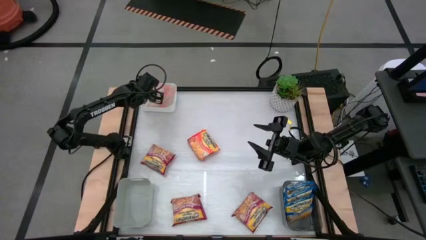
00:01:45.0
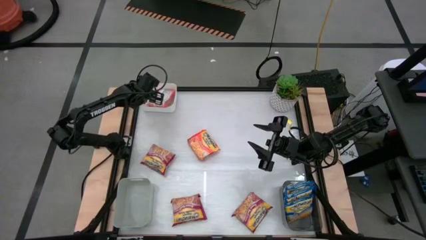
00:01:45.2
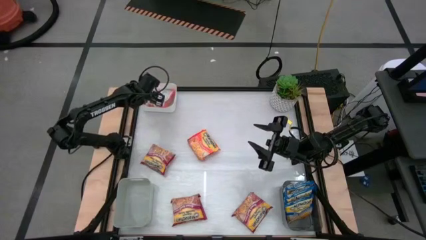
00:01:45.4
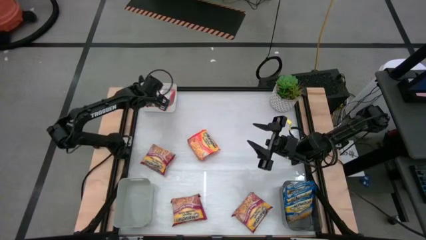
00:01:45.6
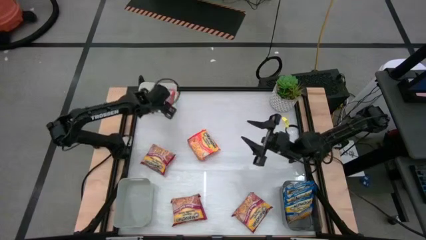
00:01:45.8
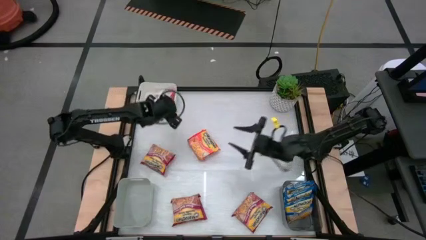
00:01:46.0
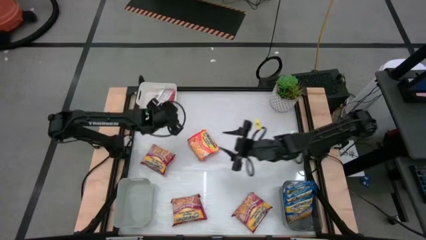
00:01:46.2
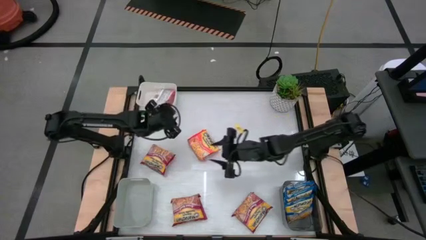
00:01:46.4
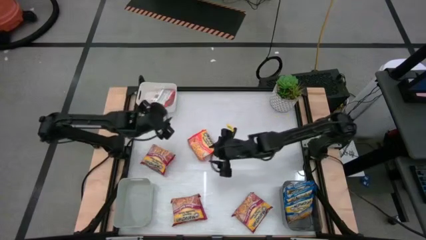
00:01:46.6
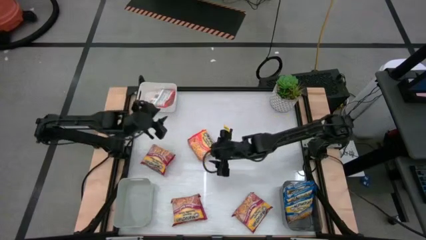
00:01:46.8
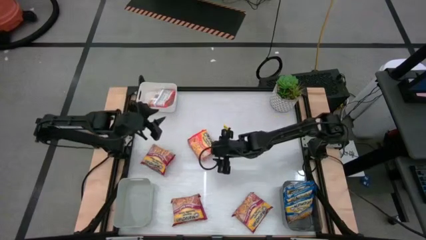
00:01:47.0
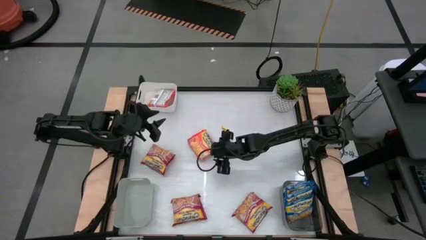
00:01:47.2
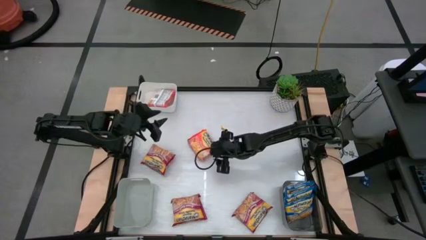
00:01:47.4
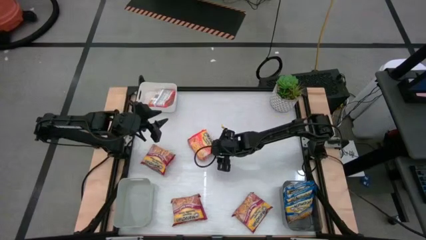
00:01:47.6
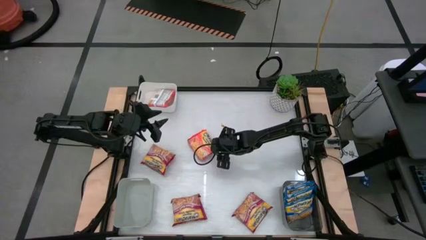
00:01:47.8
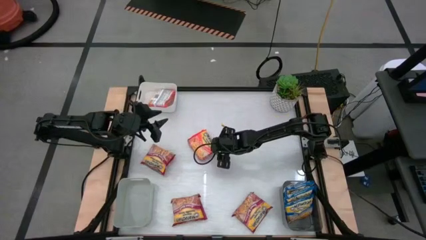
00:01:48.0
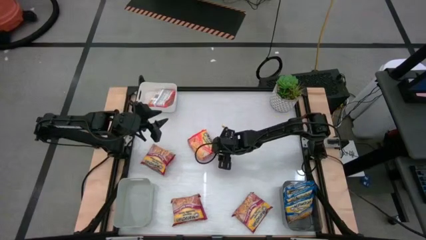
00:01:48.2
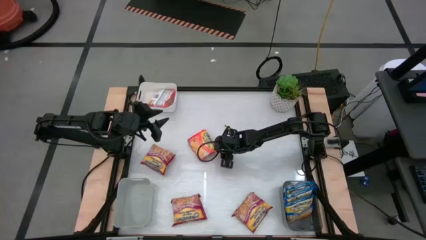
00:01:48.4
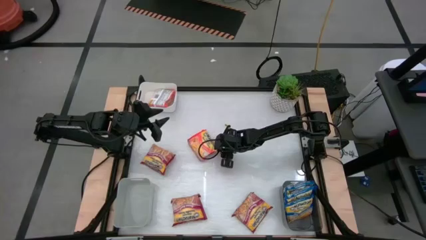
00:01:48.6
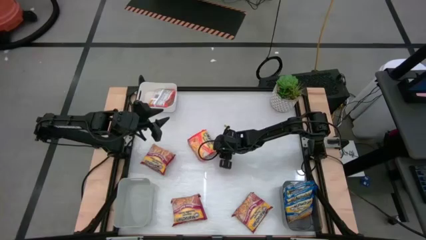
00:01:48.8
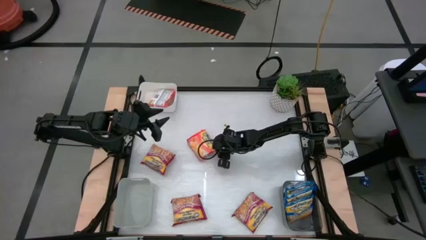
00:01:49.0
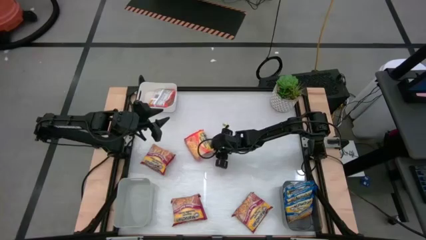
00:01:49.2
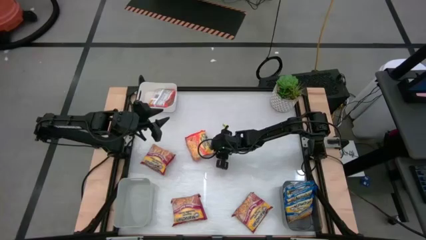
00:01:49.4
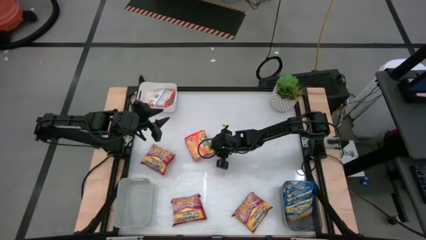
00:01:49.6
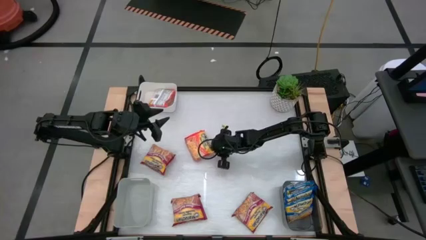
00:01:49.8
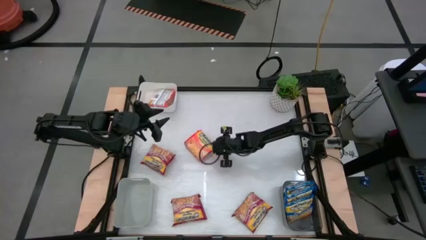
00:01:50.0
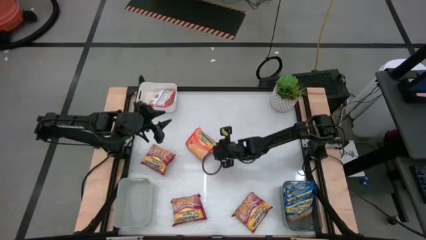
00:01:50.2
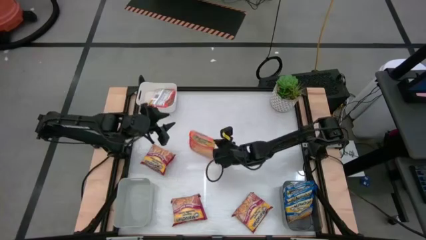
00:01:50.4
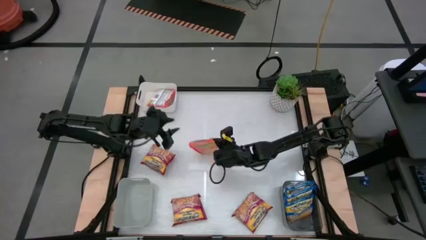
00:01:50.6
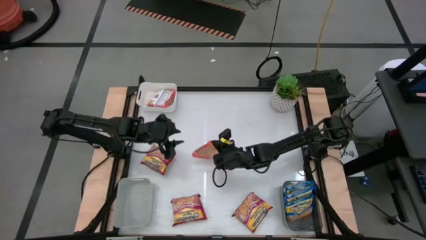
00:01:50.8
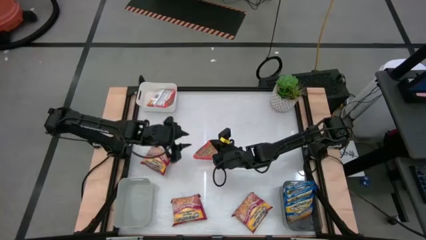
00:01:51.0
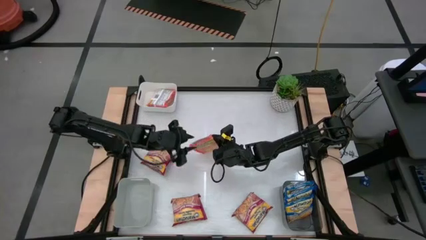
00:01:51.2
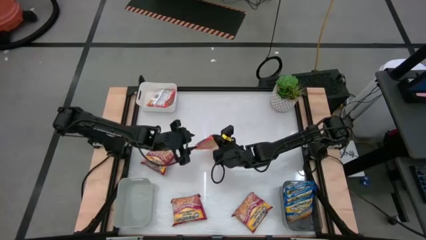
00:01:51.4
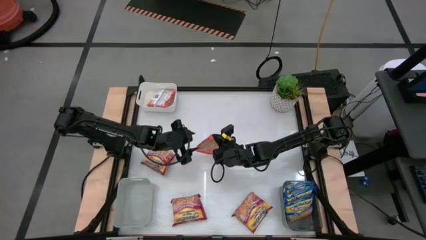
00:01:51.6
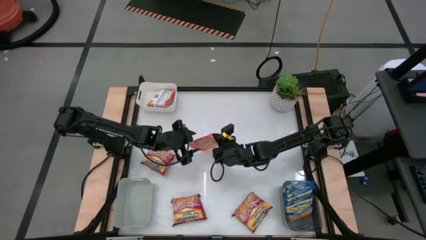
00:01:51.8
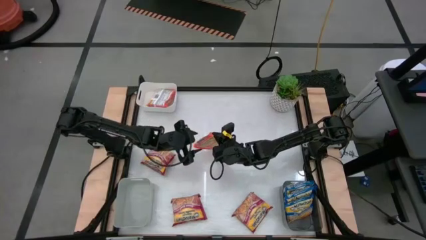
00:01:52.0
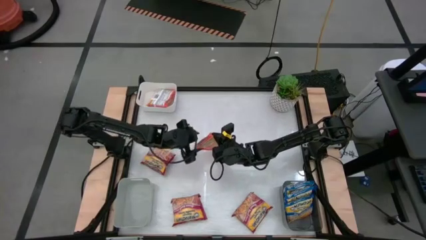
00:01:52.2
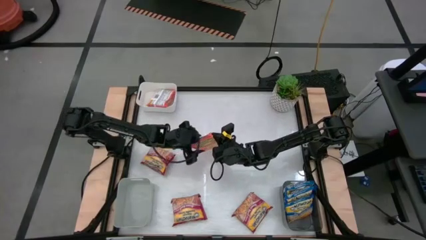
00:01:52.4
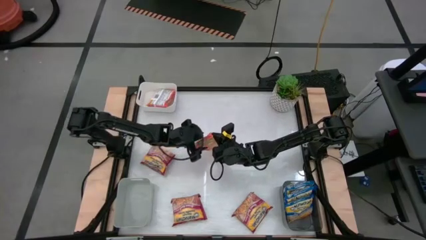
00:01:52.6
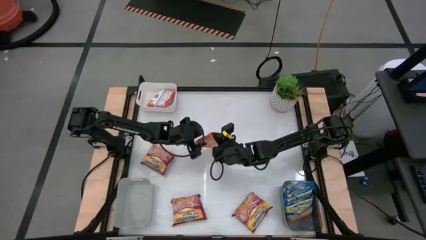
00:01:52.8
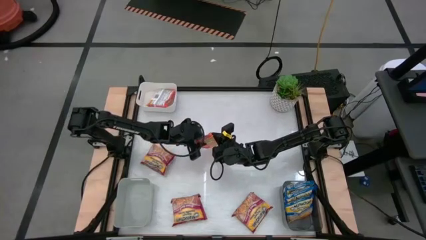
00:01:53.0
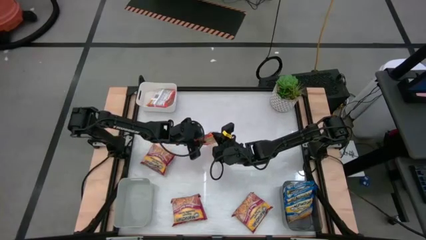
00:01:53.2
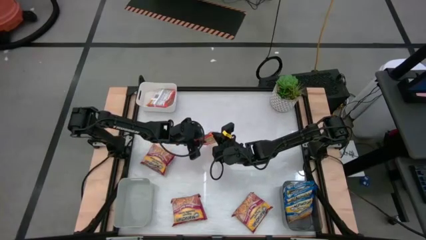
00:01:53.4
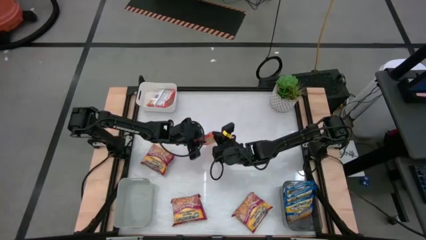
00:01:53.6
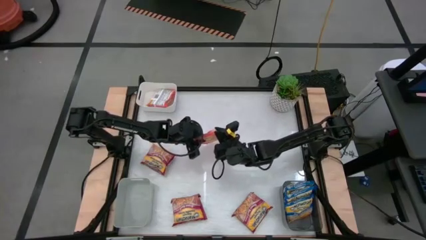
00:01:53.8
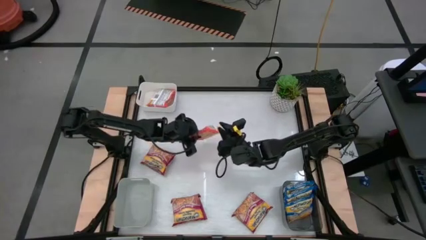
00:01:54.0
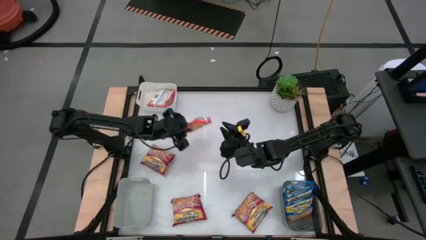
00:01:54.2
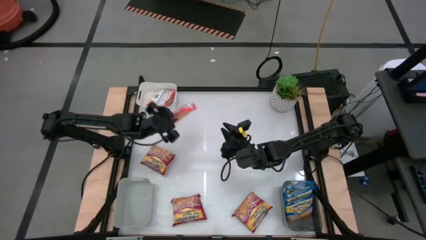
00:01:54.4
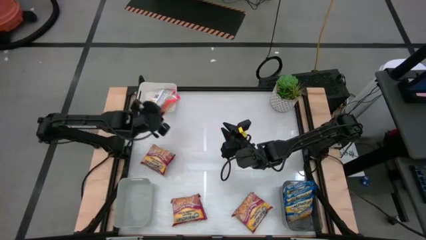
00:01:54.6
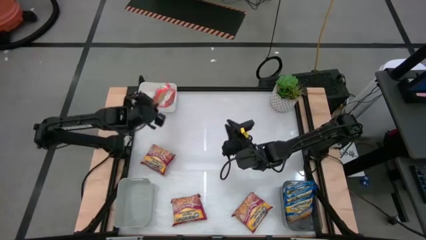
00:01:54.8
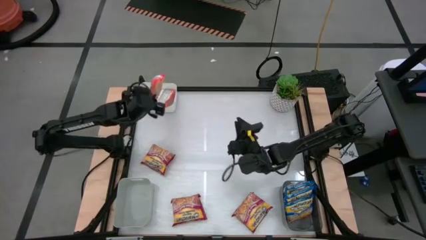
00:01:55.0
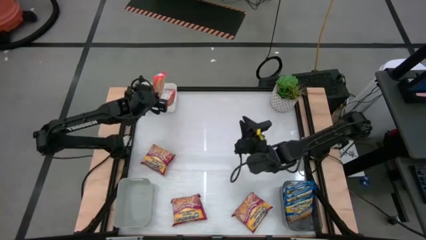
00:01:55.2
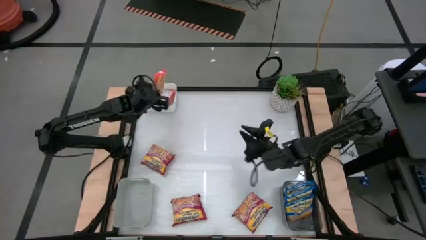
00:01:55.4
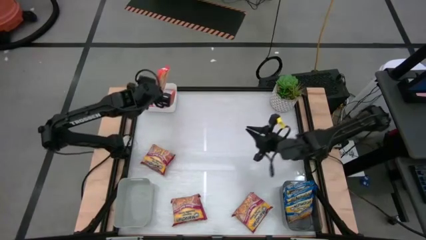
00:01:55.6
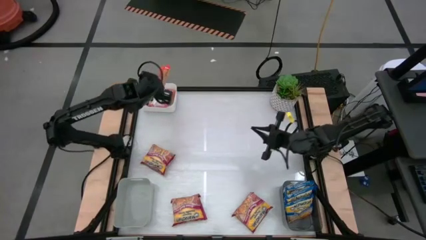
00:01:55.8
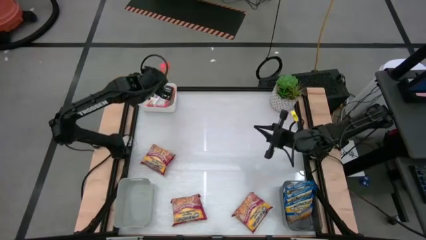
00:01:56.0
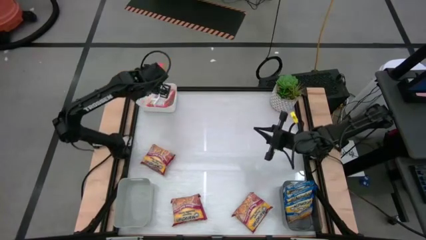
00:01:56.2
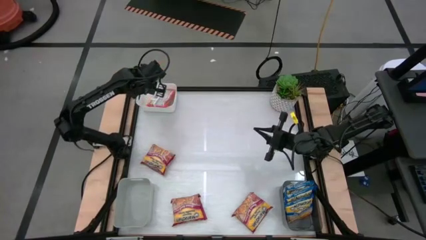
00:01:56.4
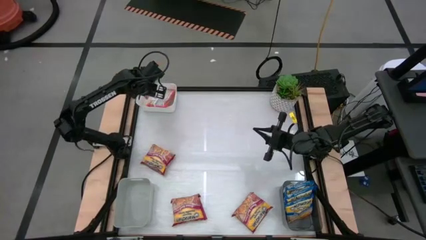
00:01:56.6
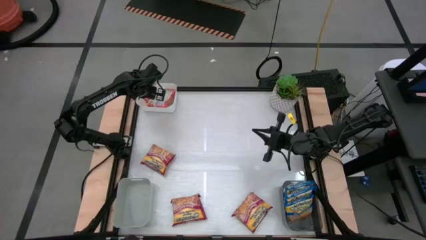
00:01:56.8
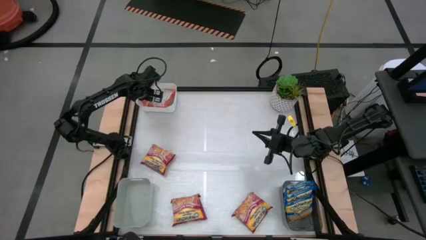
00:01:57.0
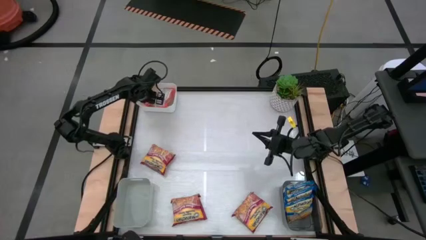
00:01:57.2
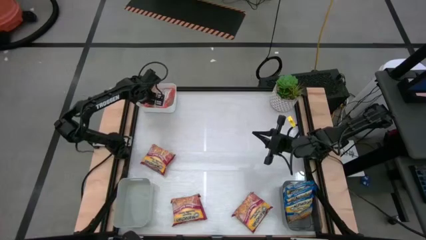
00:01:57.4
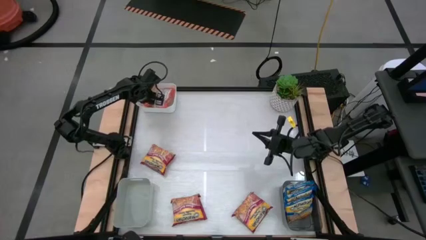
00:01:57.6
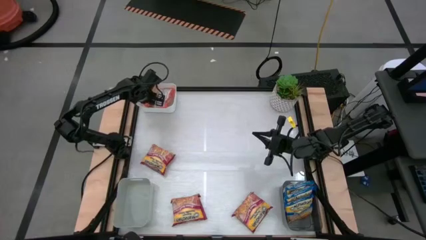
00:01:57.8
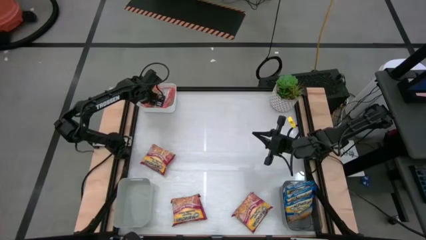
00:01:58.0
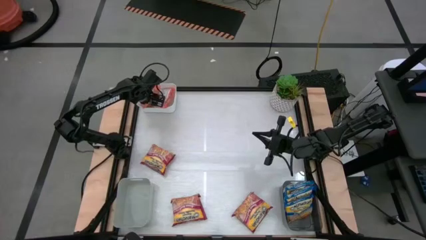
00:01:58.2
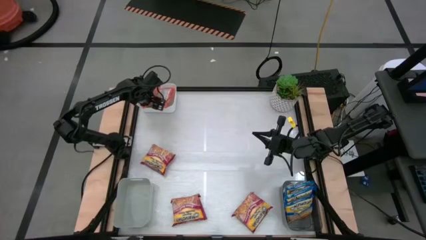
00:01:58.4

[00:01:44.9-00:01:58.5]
Task: Sort Maruchan noodles
Put the orange noodle pack into the white bin

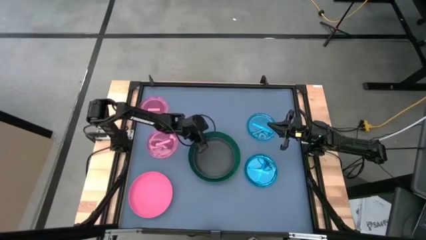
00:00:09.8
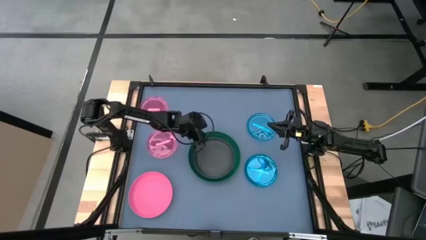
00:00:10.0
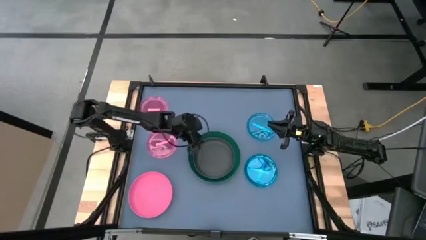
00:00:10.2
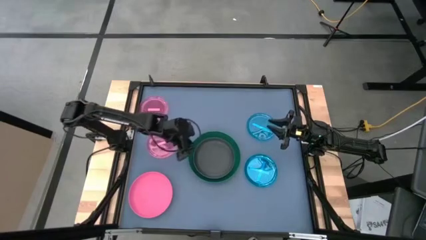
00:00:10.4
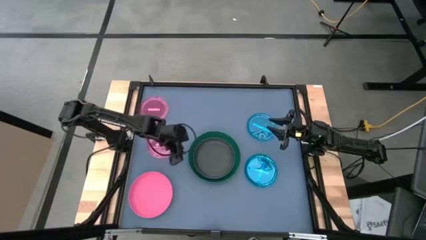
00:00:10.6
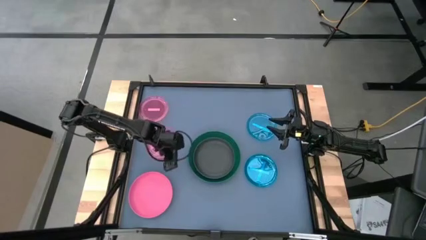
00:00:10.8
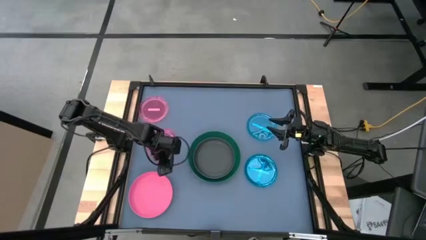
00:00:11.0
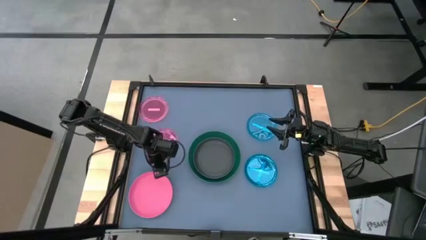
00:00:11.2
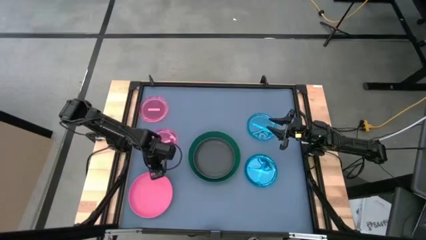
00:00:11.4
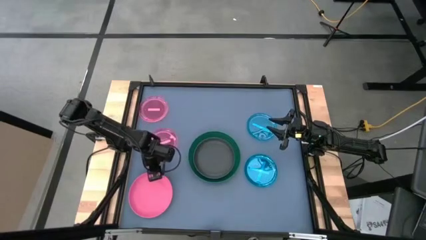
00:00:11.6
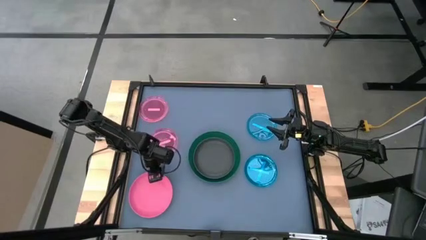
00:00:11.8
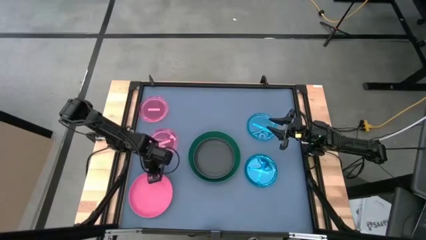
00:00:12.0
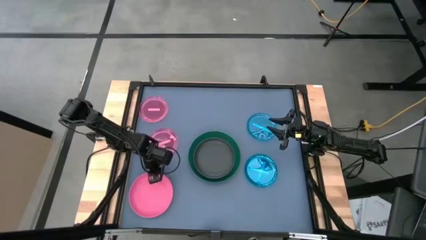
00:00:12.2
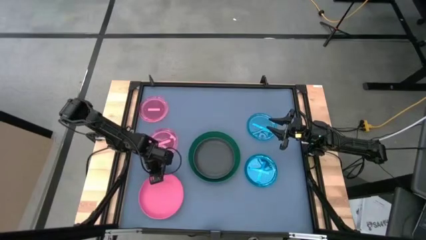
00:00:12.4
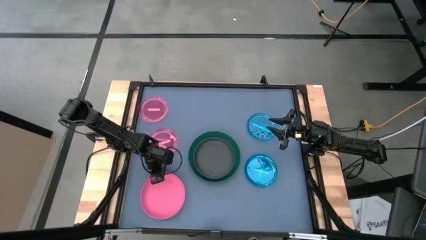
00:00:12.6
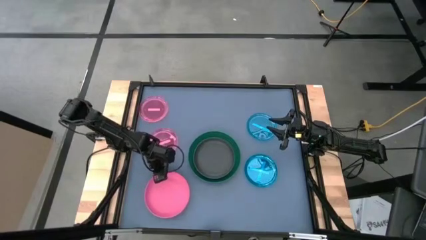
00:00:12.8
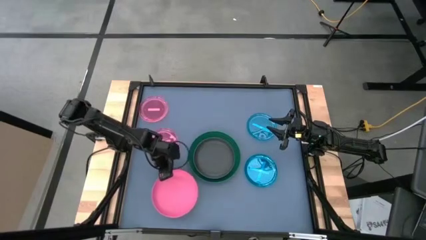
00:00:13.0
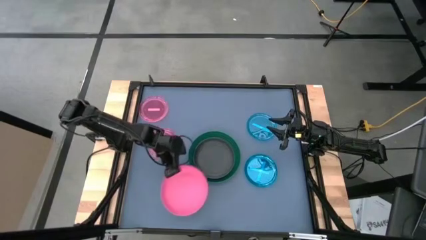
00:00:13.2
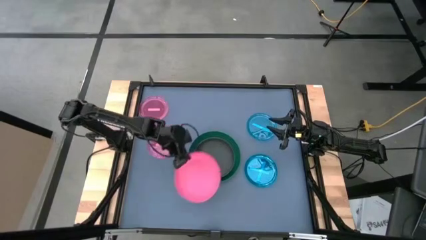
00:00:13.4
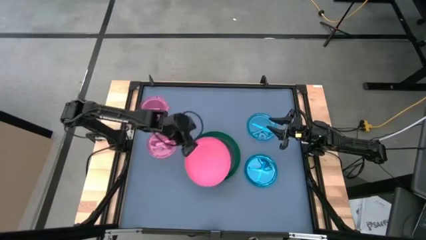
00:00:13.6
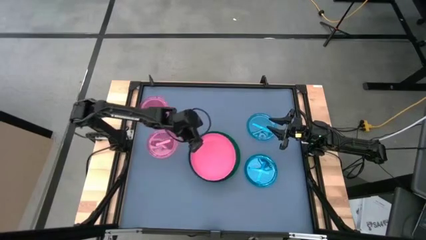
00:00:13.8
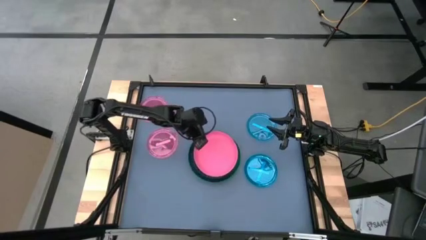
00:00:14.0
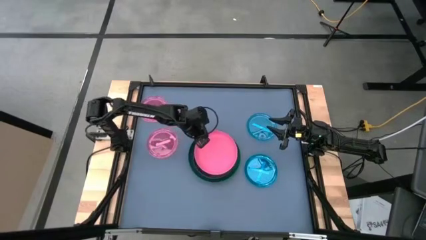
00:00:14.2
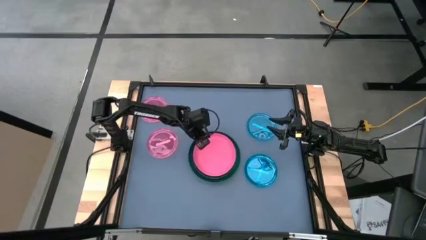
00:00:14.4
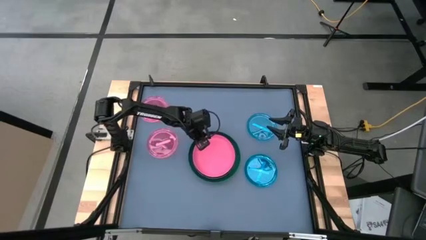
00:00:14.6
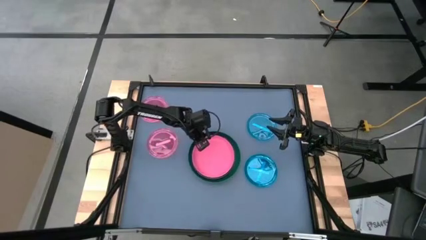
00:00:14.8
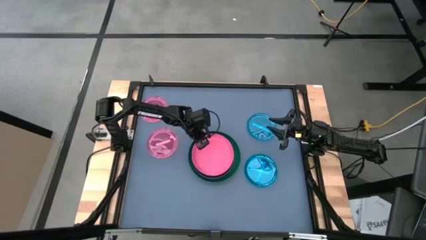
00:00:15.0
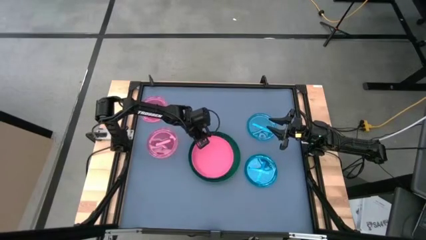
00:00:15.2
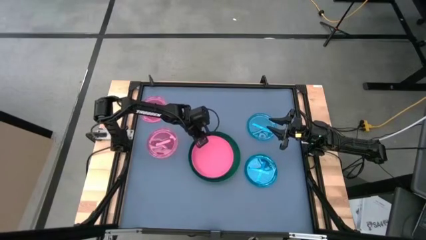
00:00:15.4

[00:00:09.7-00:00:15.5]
Task: Stack plastic plates
Stack the pink plate on top of the black plate
